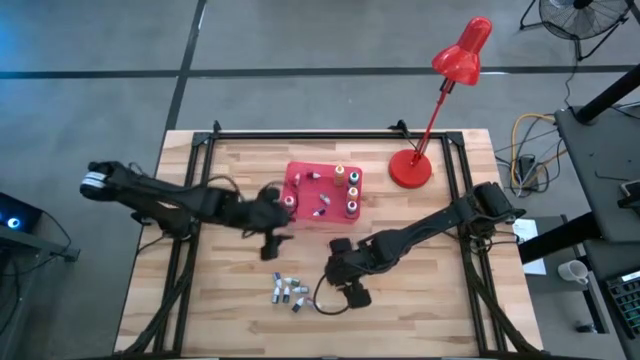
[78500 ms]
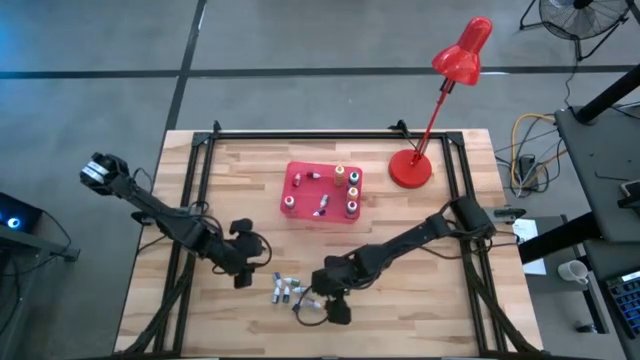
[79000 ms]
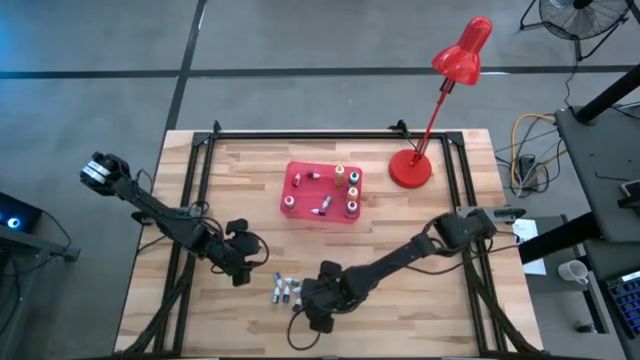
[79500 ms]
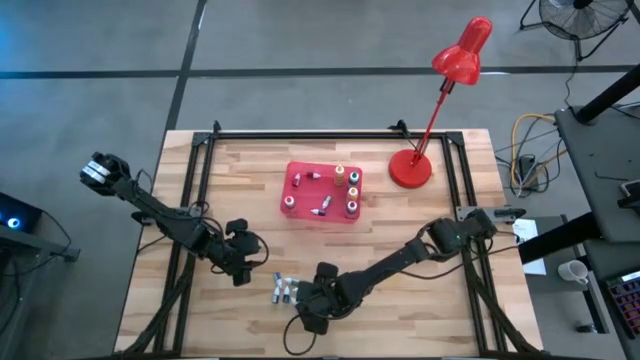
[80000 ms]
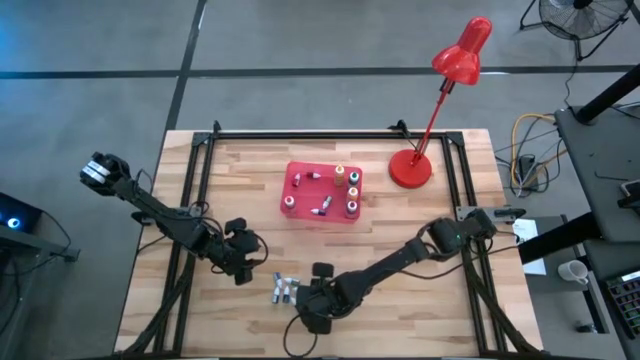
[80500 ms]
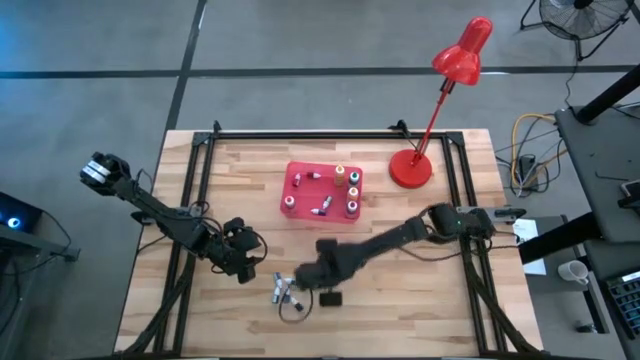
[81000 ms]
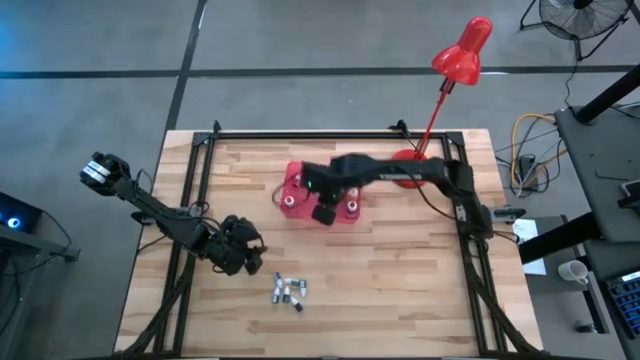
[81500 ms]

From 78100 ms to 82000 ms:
Task: Pick & Place food coloring
Put the small red food coloring bottle into the pink bin

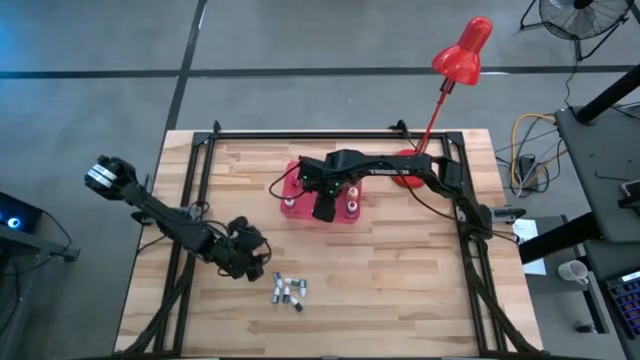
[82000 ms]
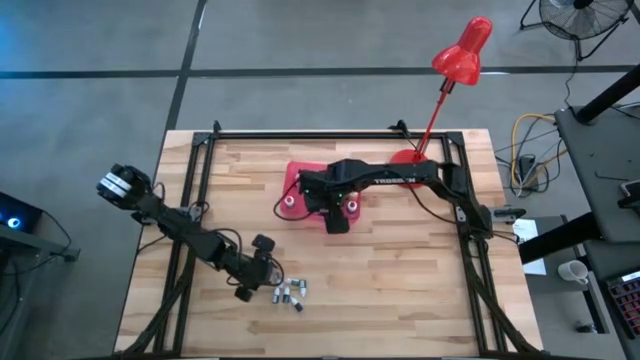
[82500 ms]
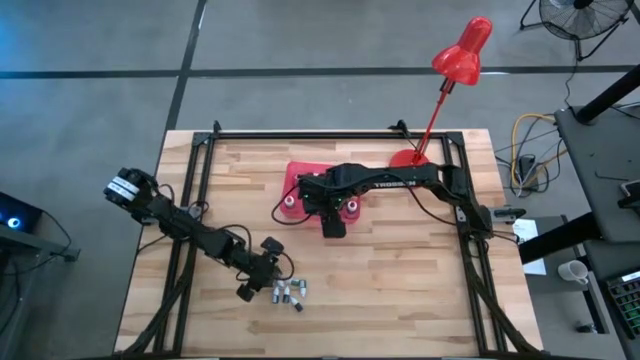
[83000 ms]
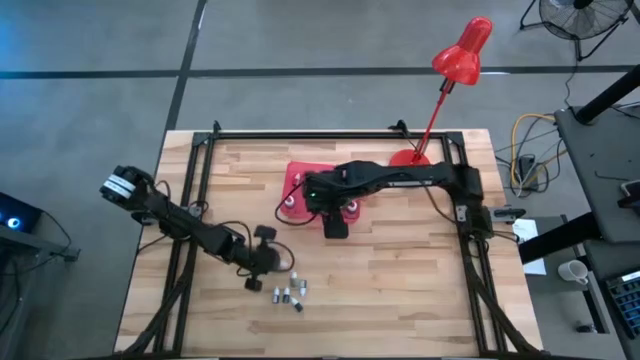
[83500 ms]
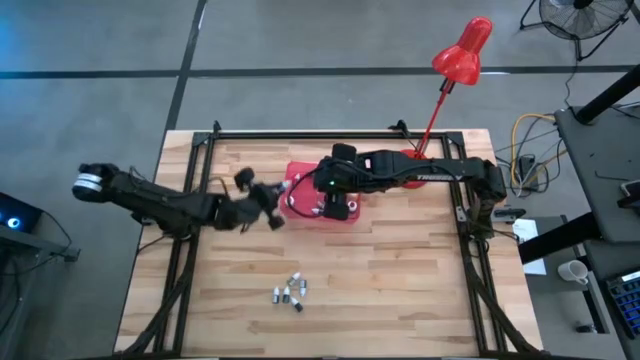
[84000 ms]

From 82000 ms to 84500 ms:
Put the small dark blue food coloring bottle into the pink bin

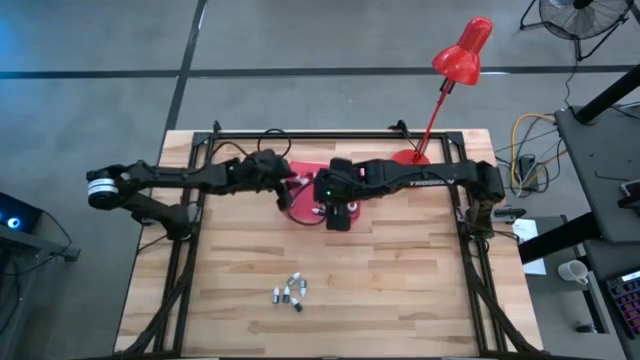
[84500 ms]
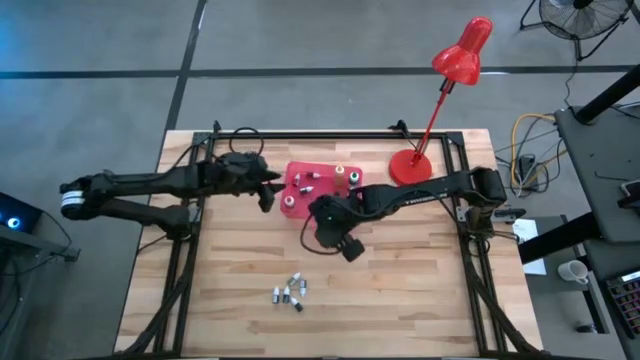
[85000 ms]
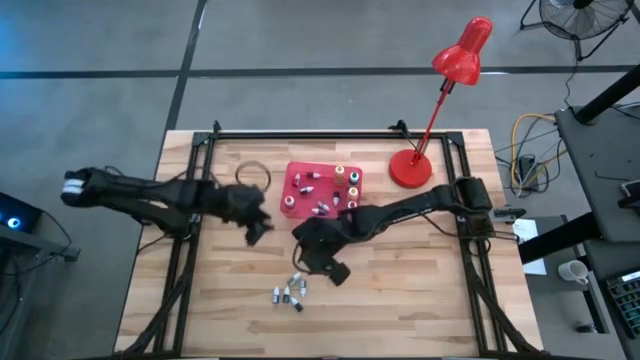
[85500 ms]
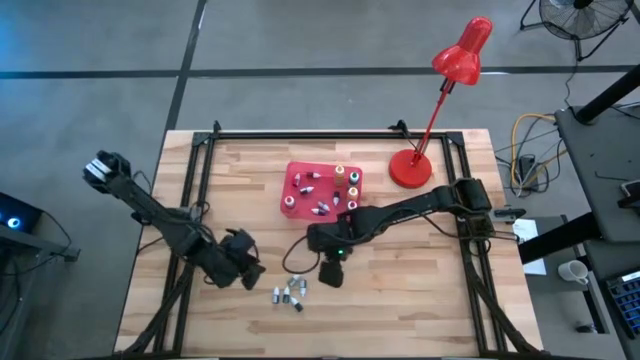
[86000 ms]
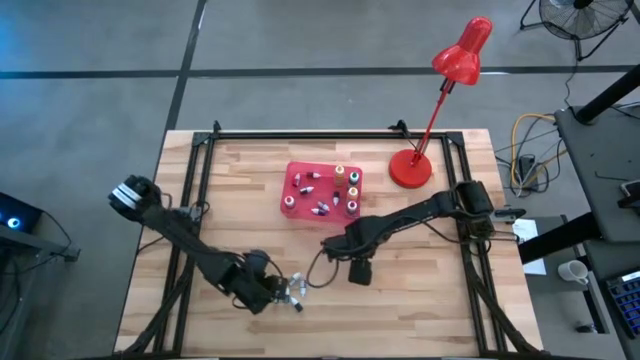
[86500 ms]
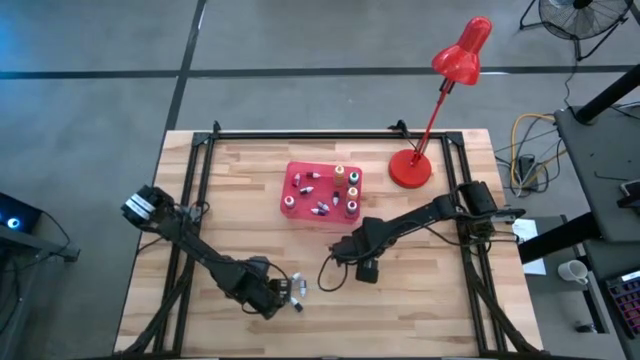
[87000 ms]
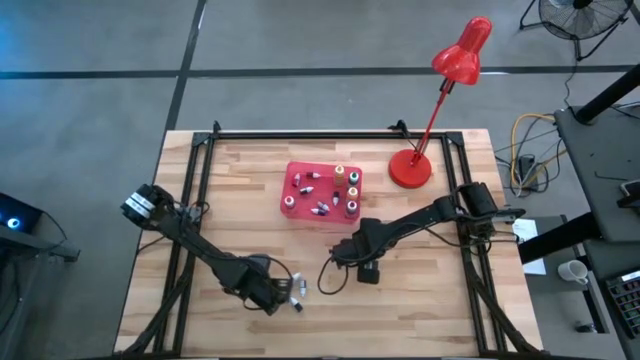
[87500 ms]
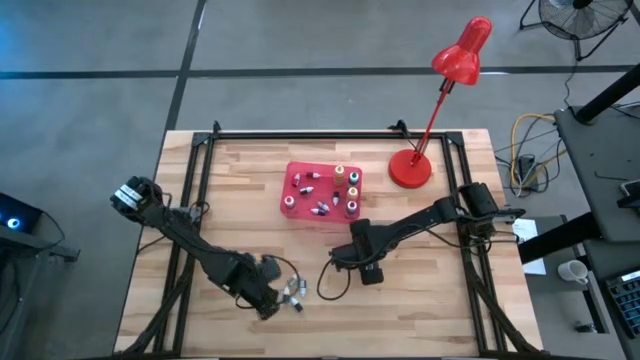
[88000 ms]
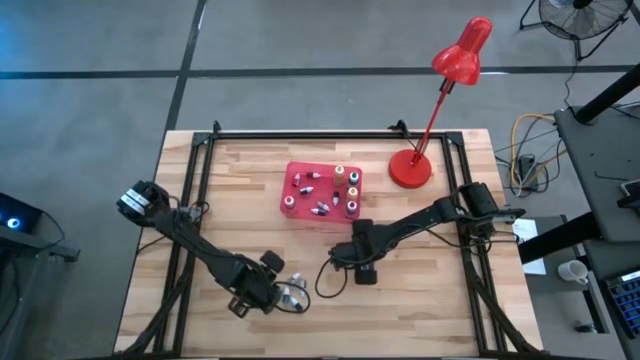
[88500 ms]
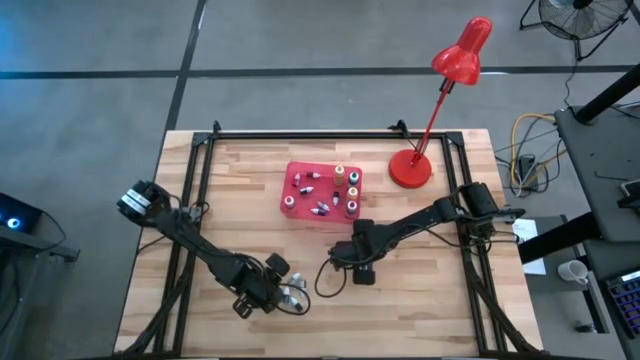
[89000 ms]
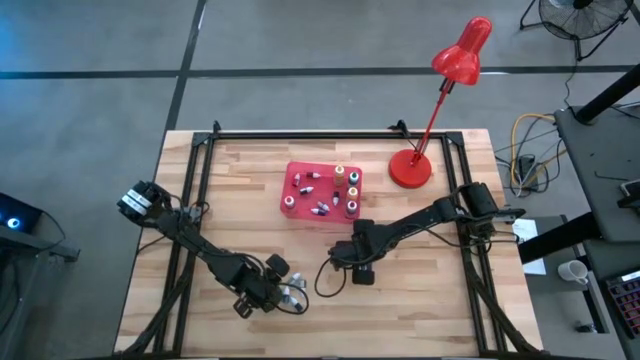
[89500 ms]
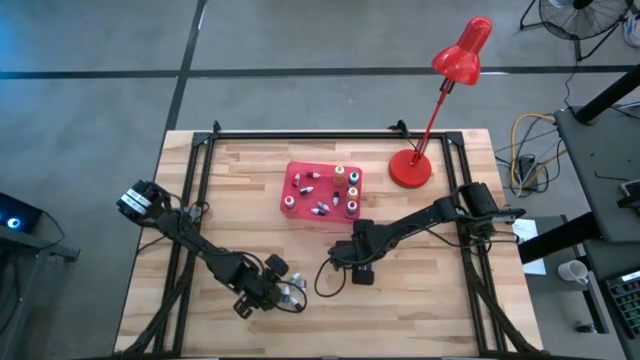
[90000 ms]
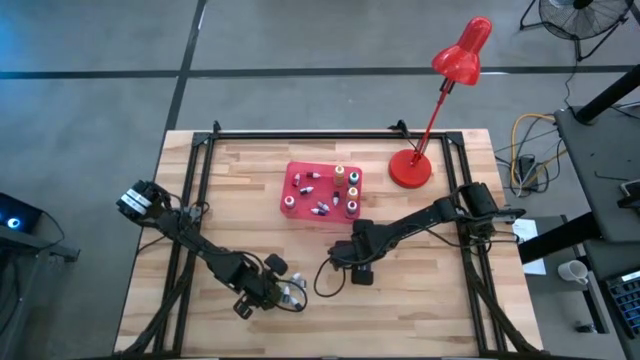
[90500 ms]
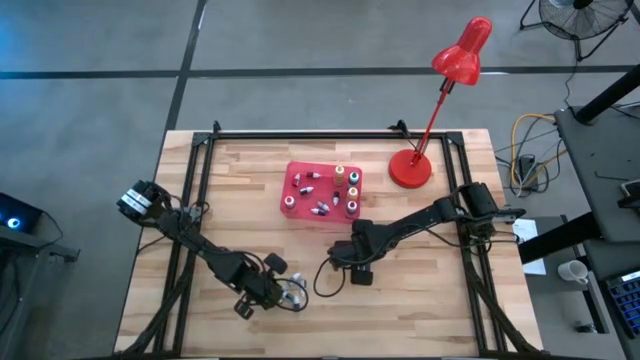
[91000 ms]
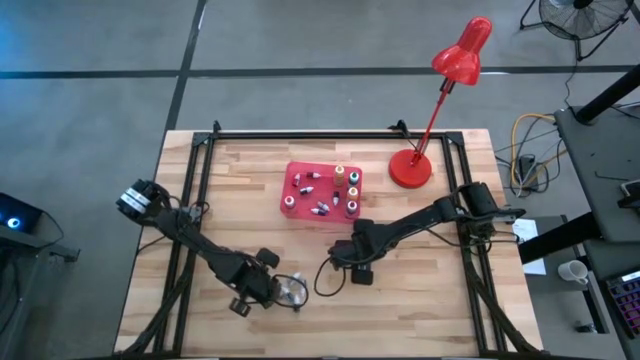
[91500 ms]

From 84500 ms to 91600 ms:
Put the small pink food coloring bottle into the pink bin

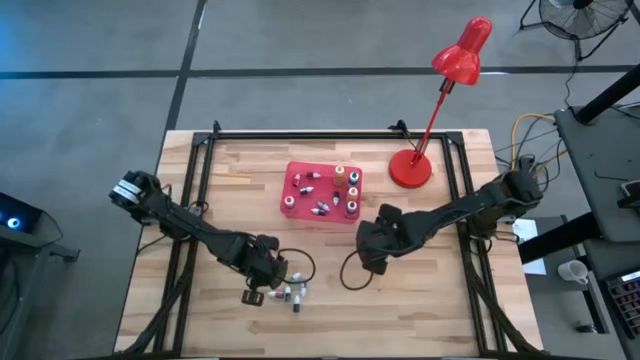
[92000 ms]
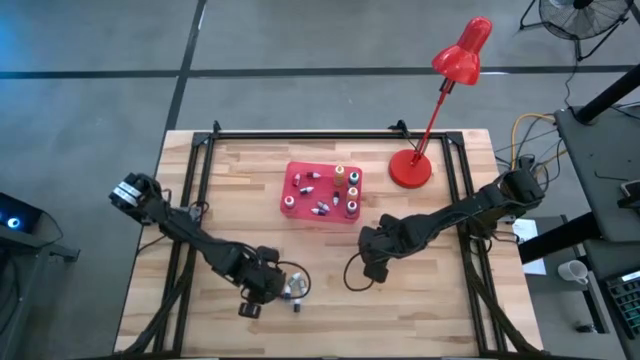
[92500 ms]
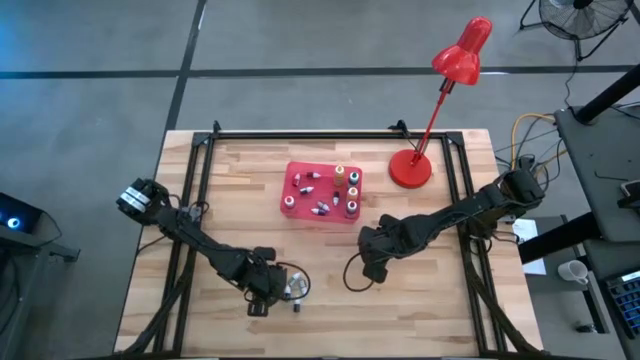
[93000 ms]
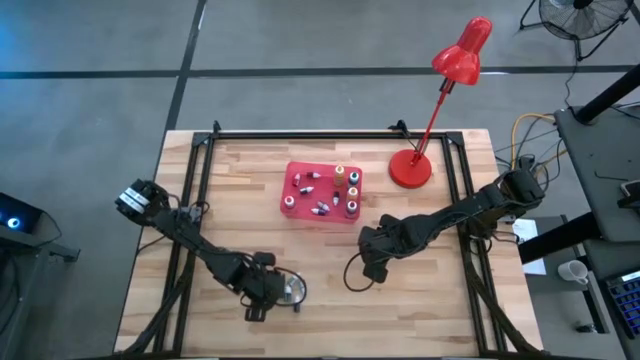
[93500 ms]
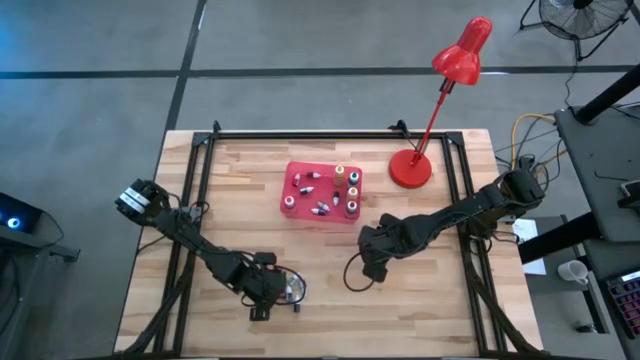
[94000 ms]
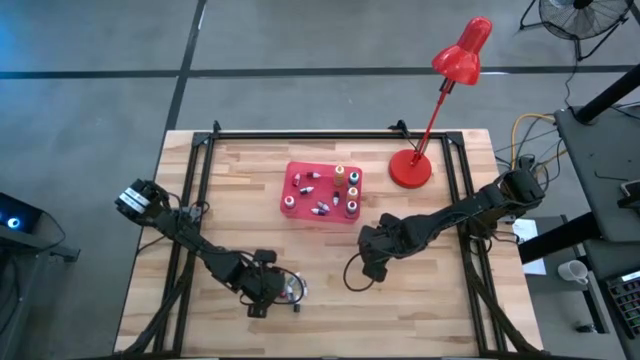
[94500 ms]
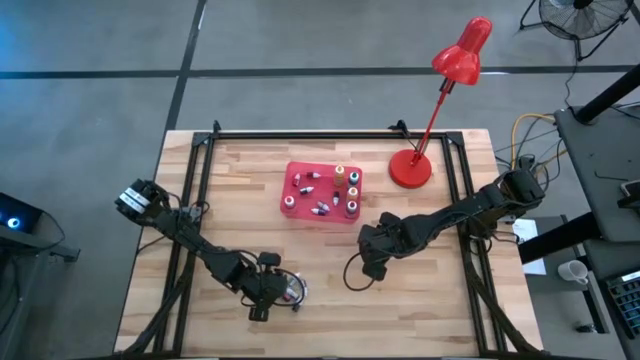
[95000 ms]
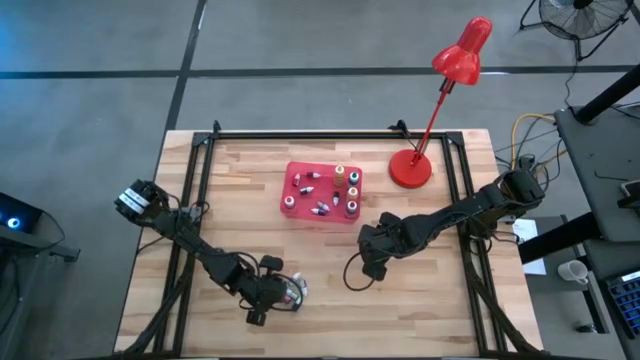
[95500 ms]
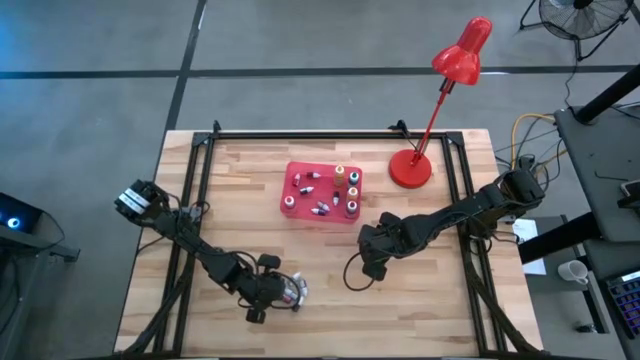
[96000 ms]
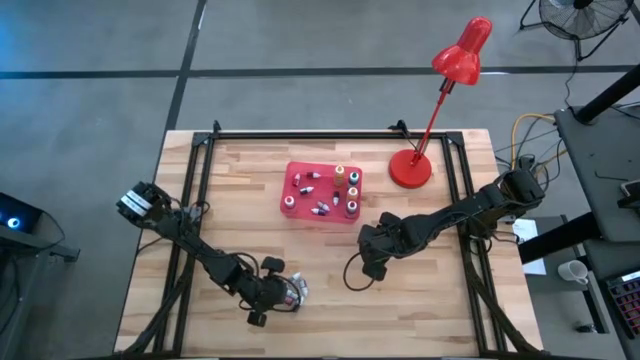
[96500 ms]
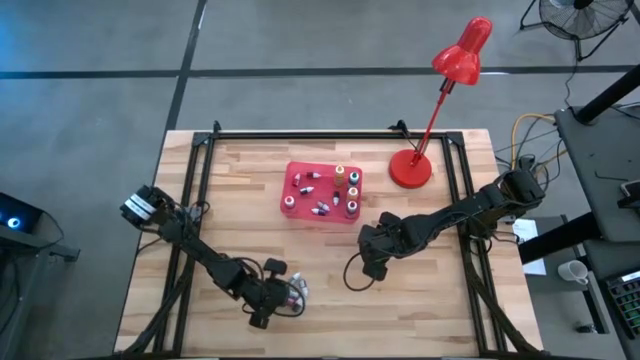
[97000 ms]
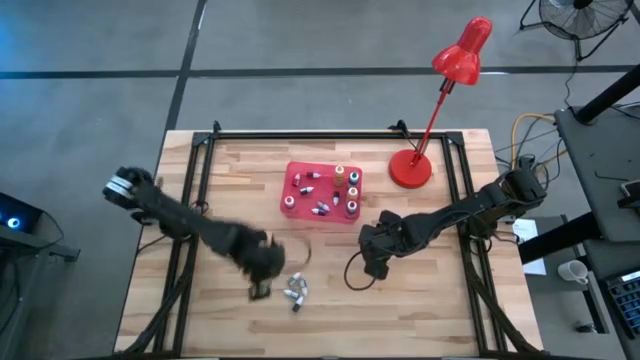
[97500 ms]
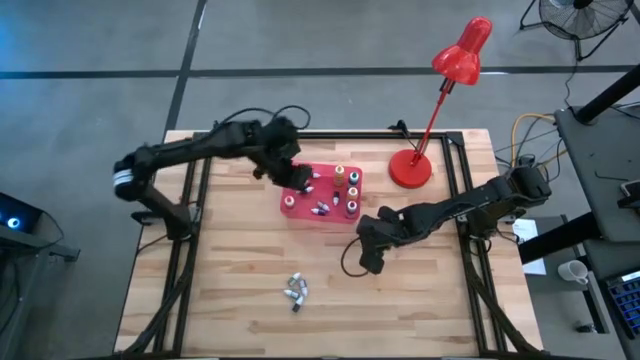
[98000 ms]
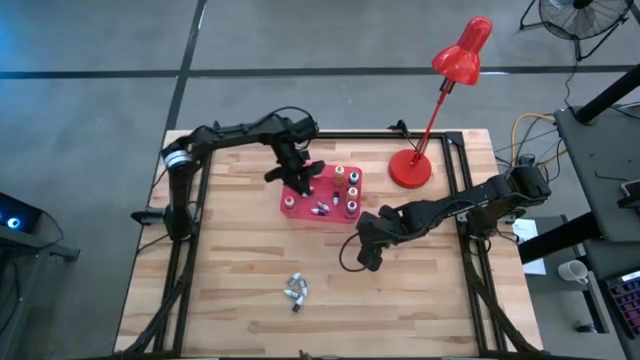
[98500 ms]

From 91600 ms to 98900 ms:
Put the small pink food coloring bottle into the pink bin

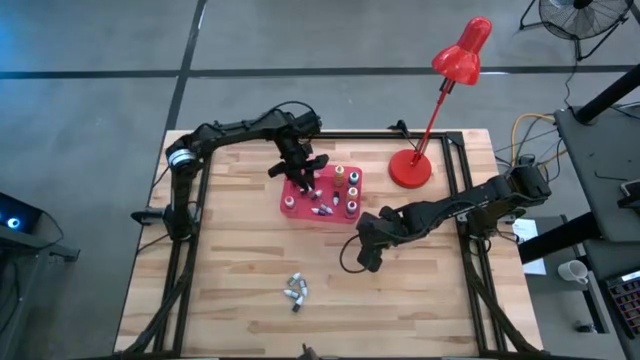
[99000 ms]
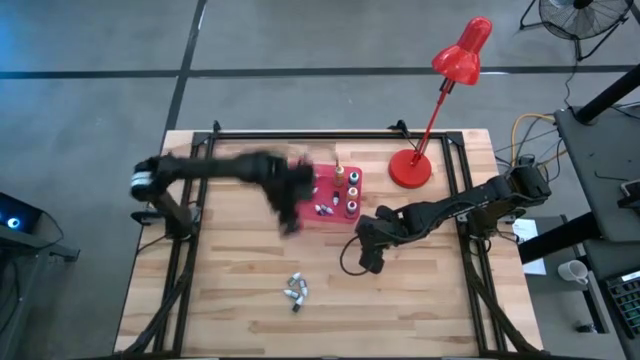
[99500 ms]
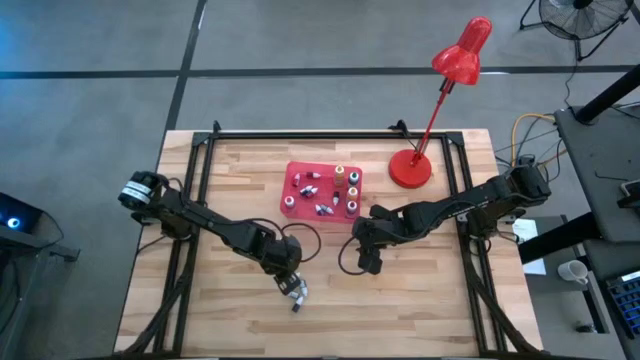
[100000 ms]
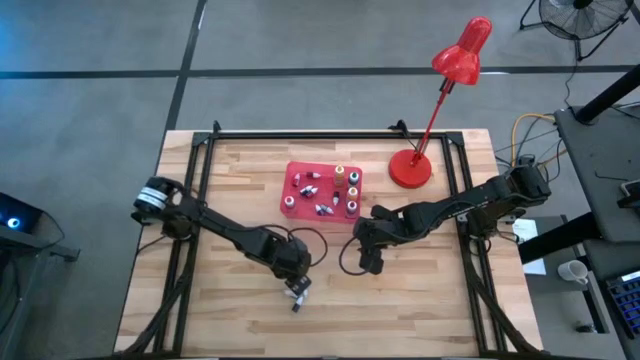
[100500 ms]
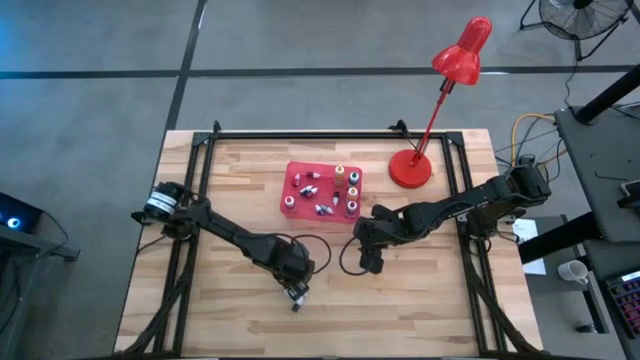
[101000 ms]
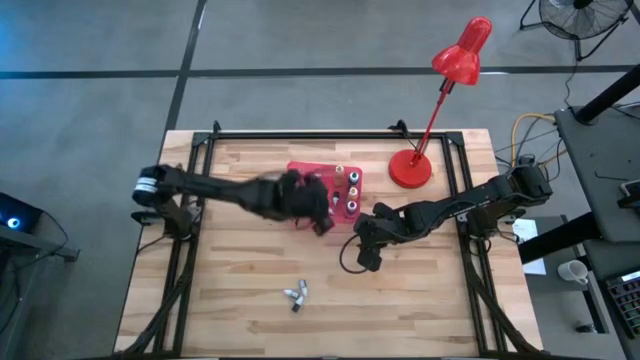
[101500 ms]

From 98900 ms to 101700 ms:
Put the small green food coloring bottle into the pink bin
